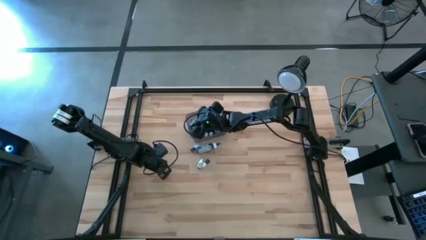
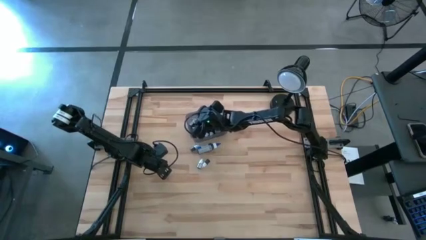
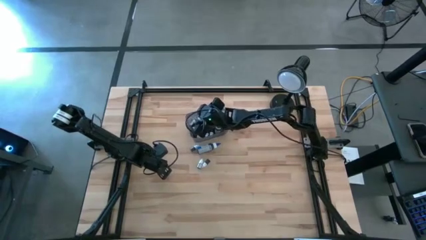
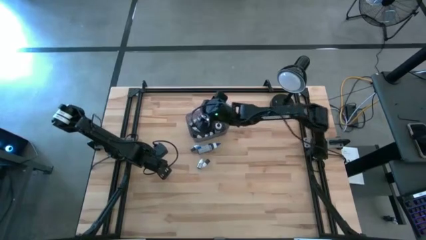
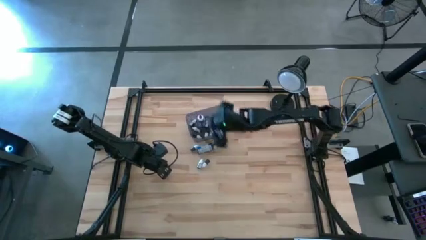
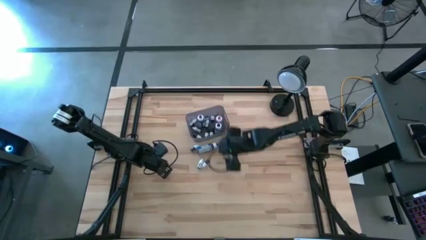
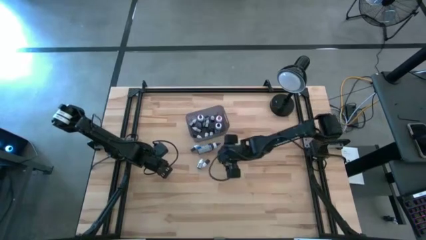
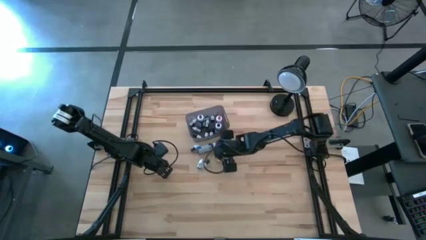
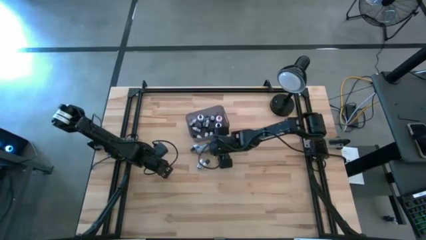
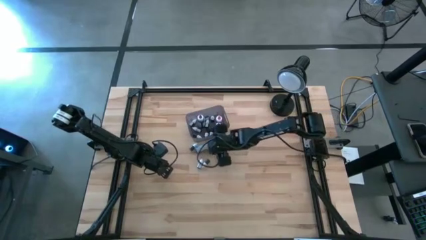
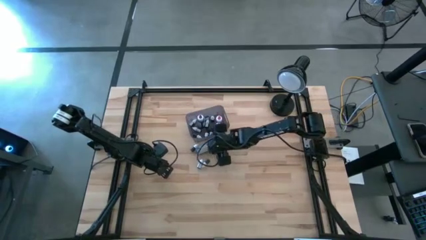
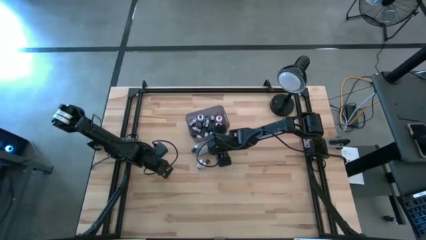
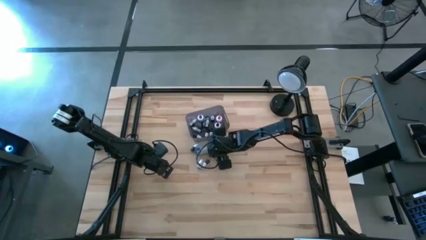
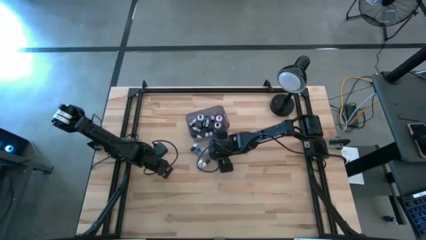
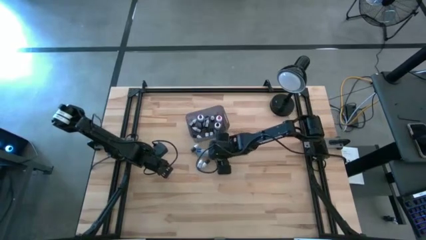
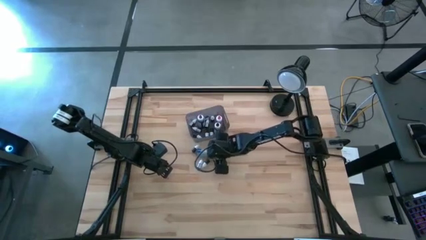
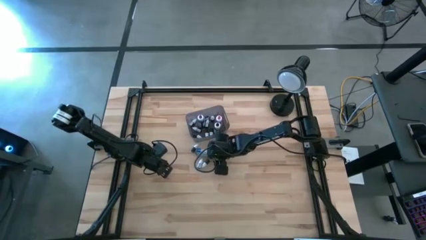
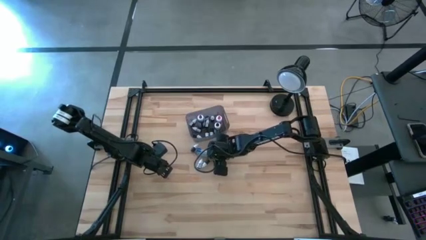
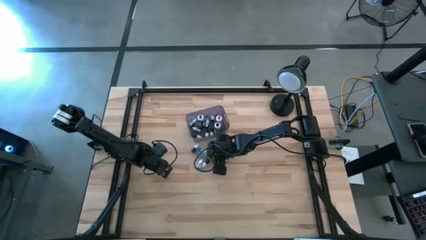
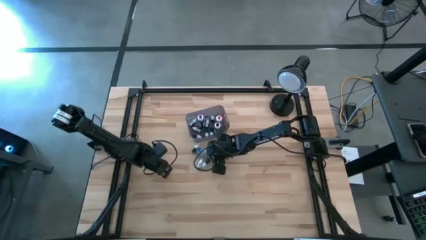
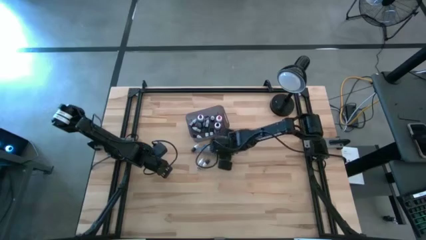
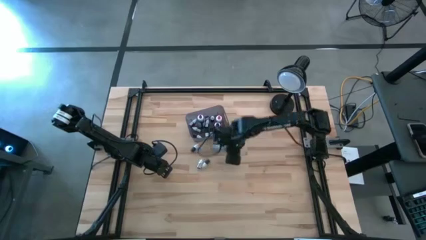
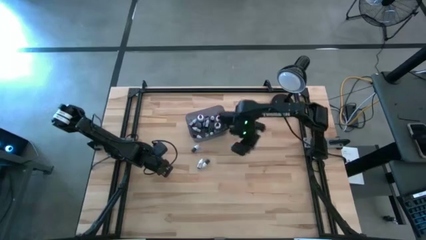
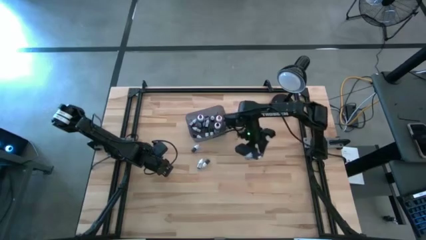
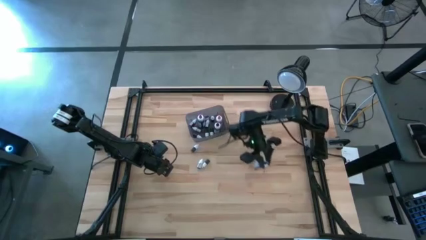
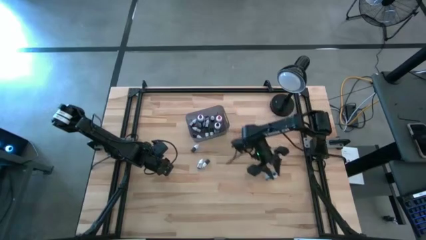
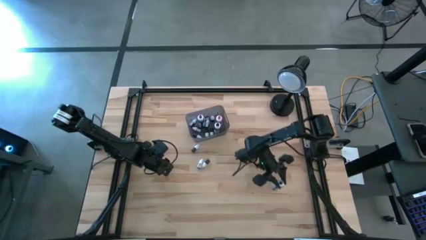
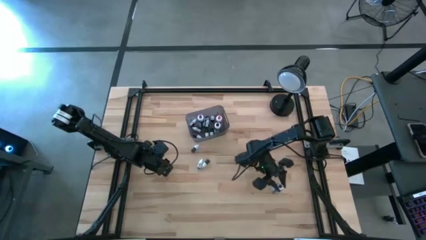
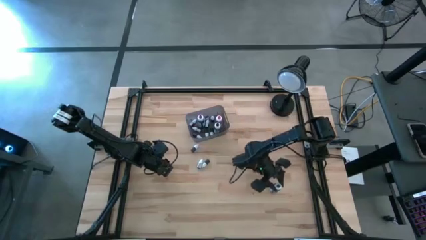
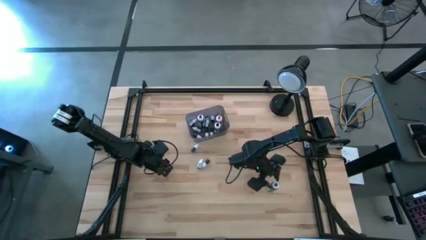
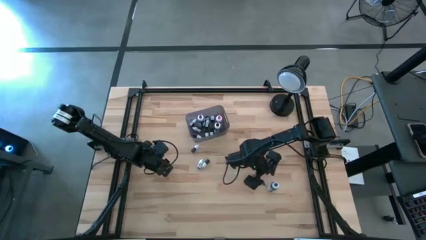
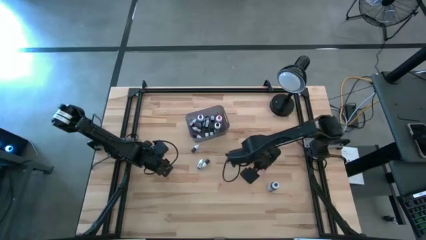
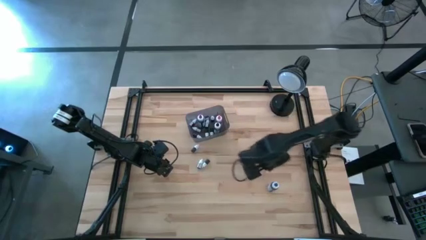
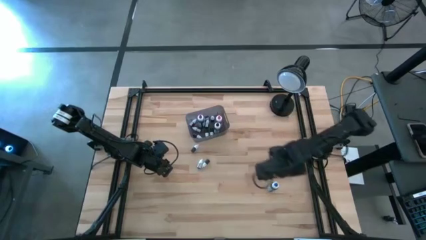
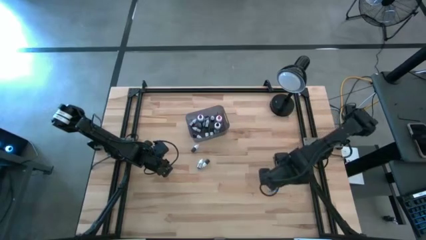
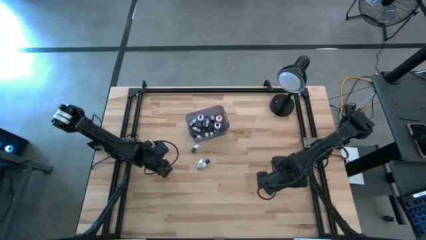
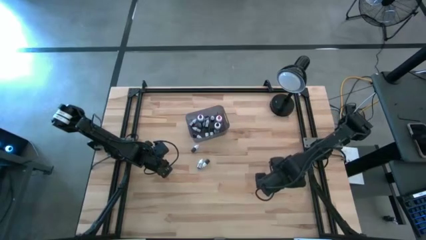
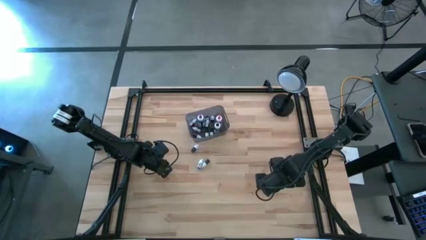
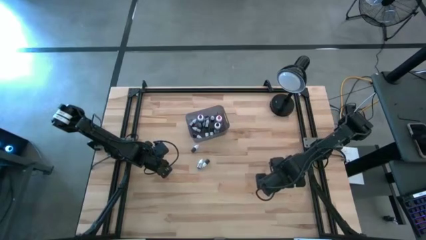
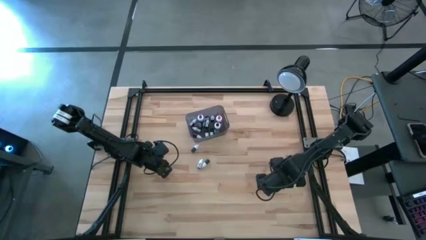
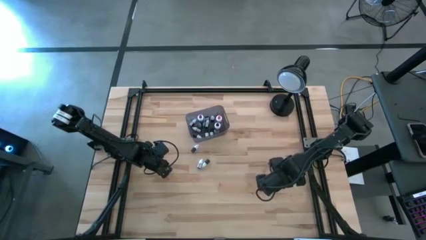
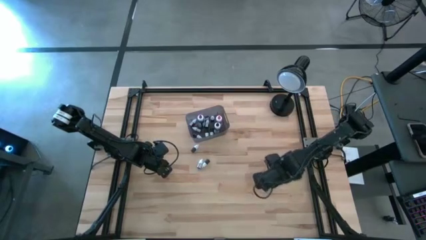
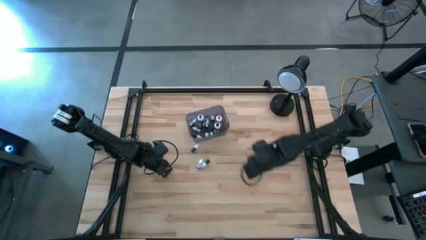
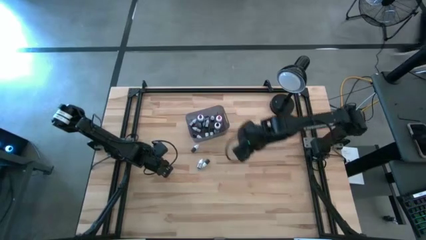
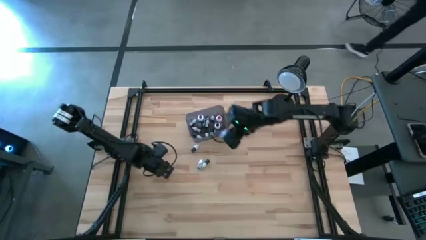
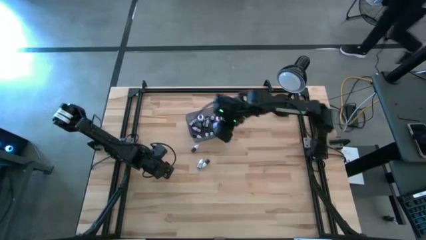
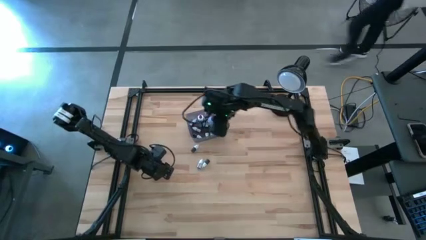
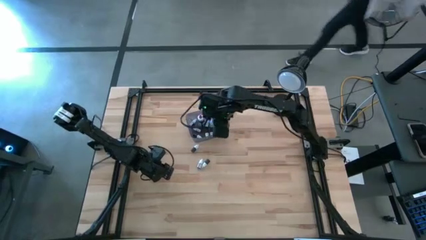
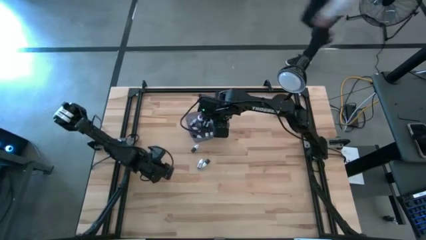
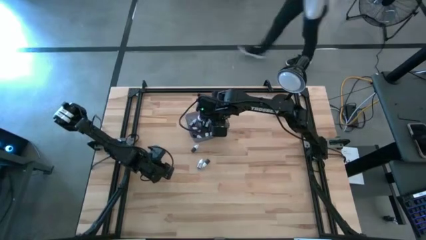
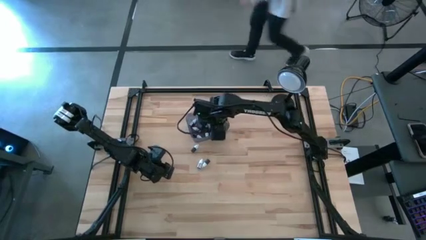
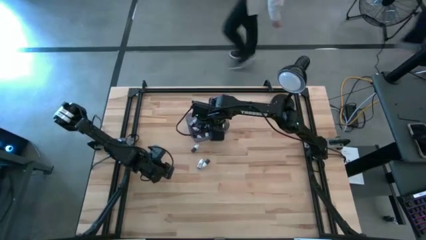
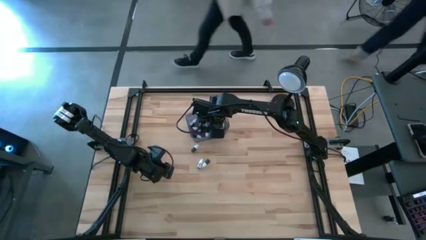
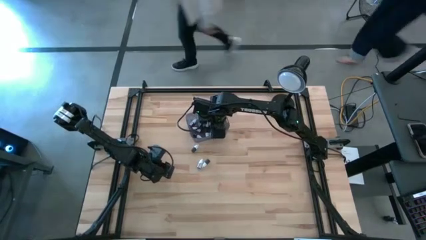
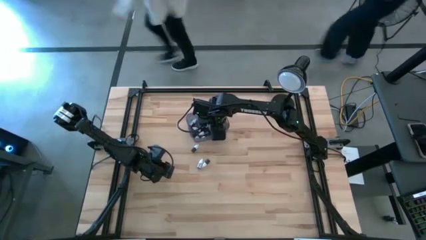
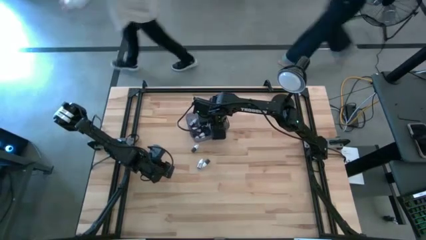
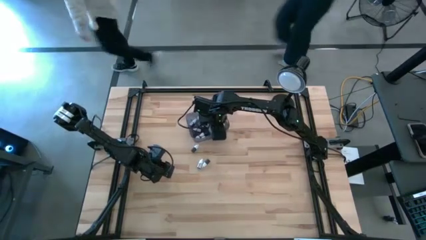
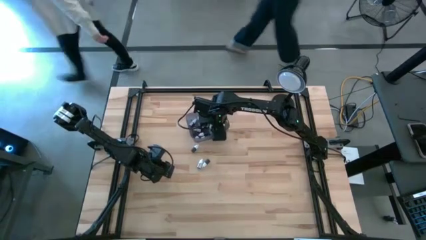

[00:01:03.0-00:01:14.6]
Task: Pick & Place food coloring
Put the large blue food coloring bottle into the gray bin
